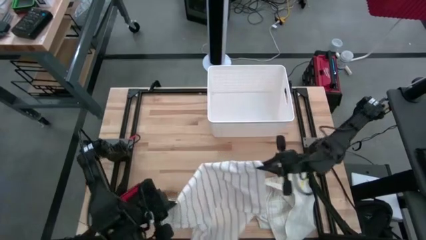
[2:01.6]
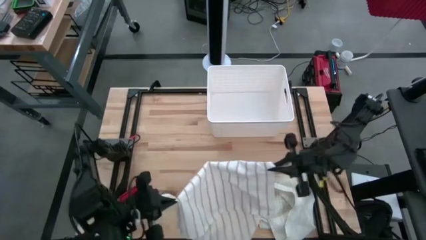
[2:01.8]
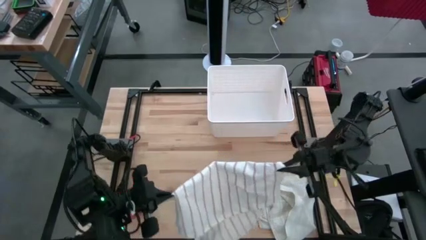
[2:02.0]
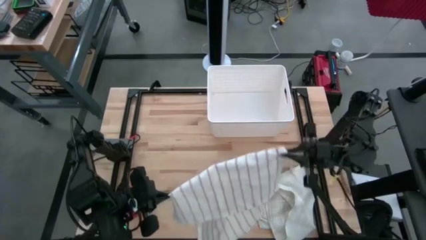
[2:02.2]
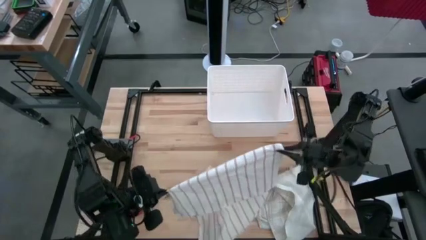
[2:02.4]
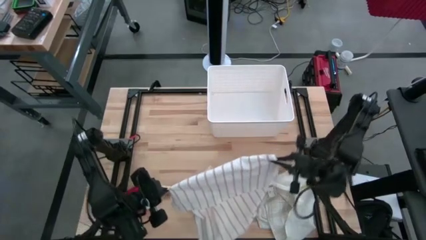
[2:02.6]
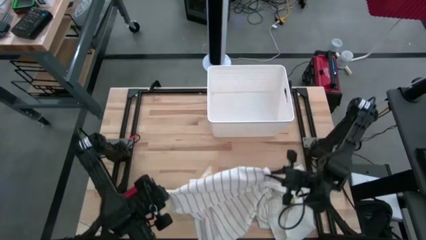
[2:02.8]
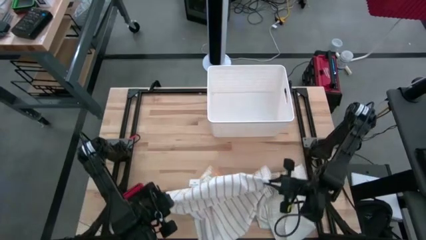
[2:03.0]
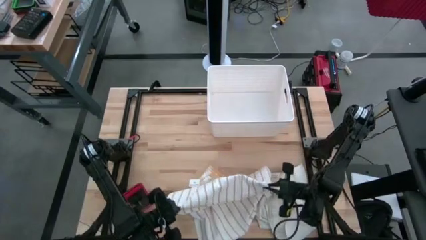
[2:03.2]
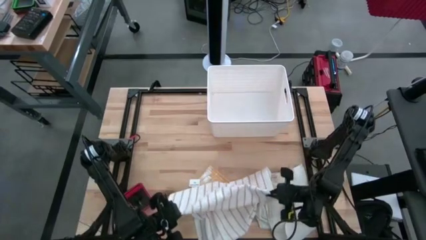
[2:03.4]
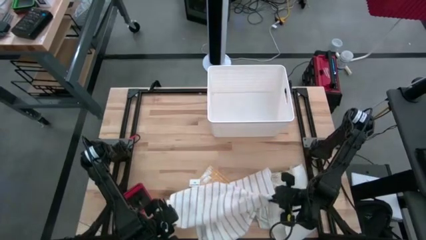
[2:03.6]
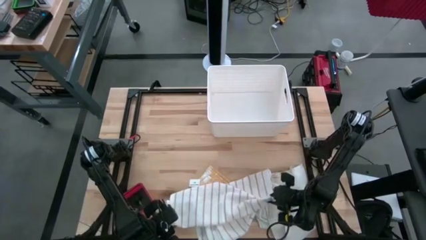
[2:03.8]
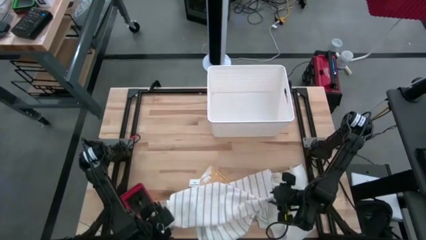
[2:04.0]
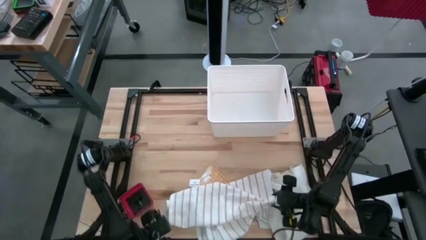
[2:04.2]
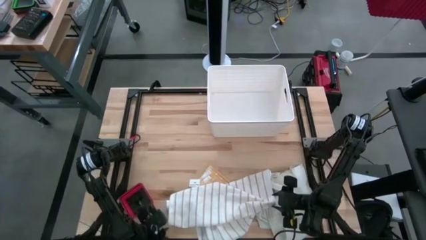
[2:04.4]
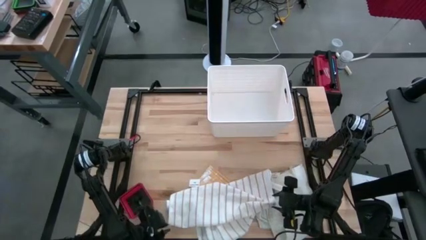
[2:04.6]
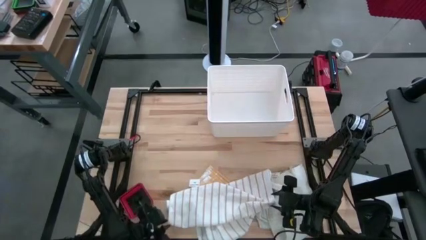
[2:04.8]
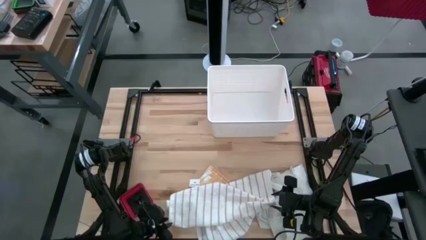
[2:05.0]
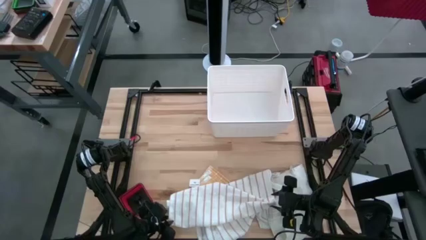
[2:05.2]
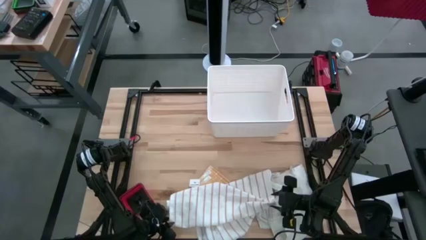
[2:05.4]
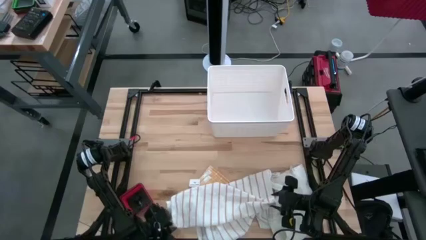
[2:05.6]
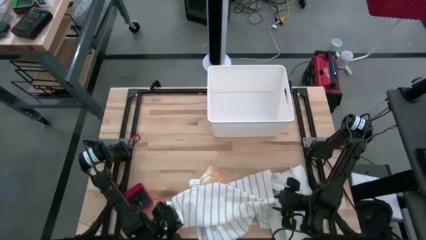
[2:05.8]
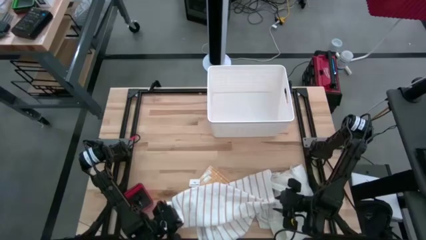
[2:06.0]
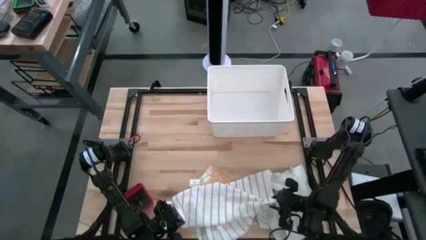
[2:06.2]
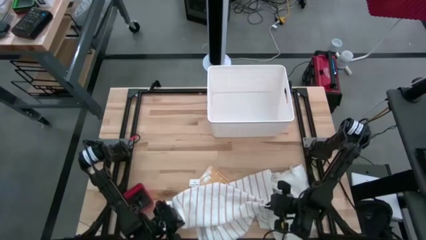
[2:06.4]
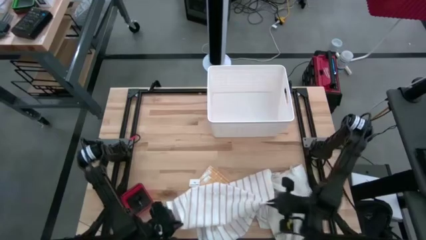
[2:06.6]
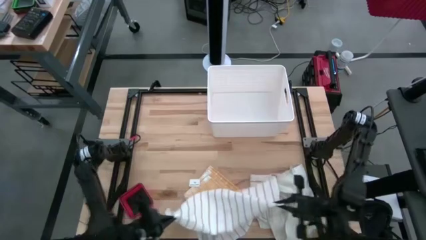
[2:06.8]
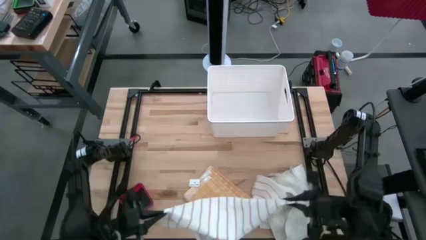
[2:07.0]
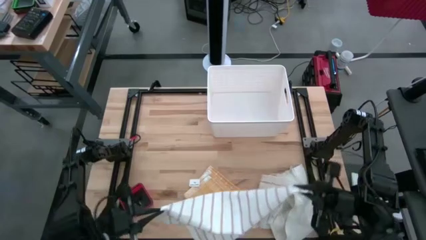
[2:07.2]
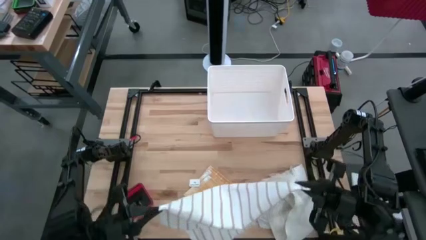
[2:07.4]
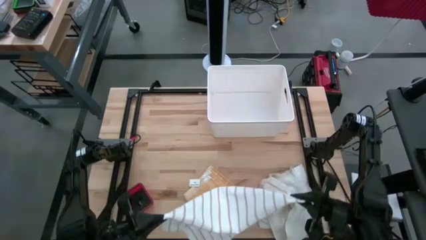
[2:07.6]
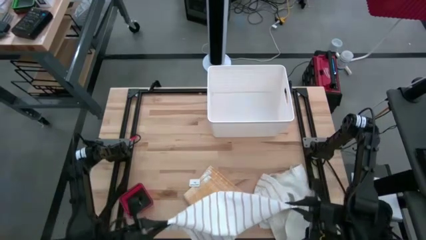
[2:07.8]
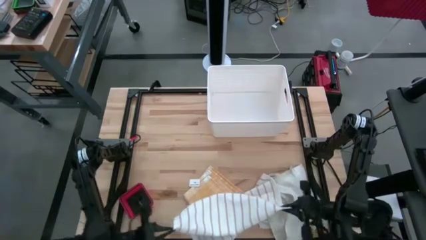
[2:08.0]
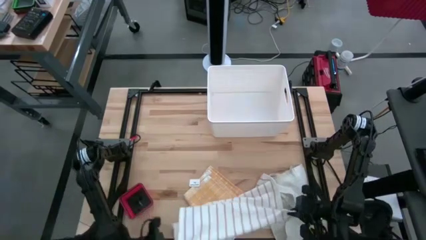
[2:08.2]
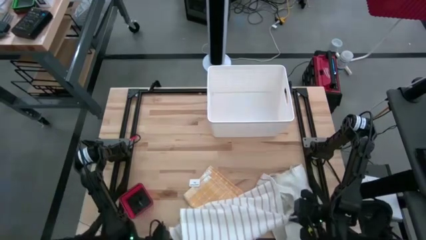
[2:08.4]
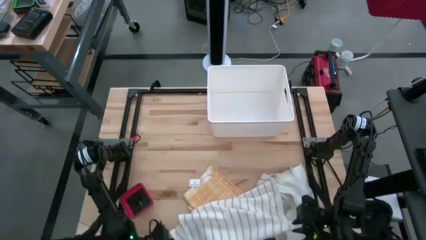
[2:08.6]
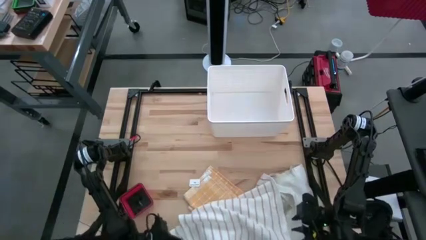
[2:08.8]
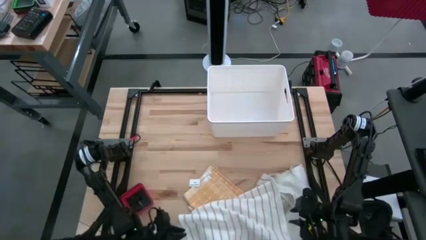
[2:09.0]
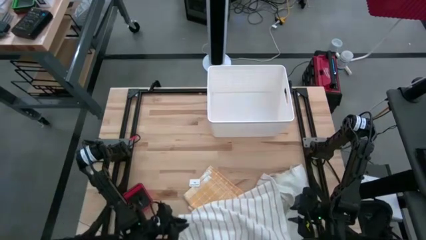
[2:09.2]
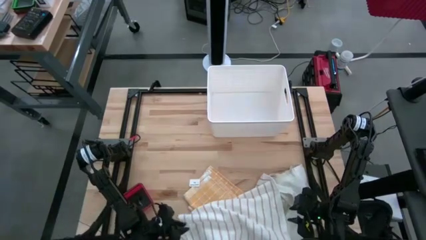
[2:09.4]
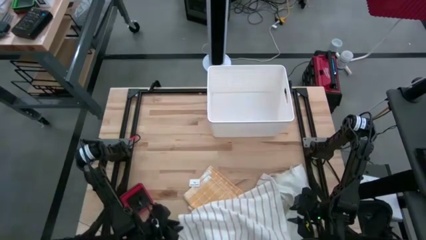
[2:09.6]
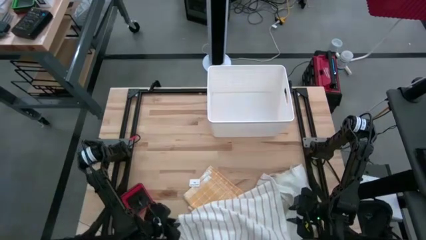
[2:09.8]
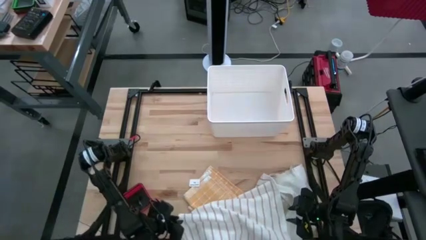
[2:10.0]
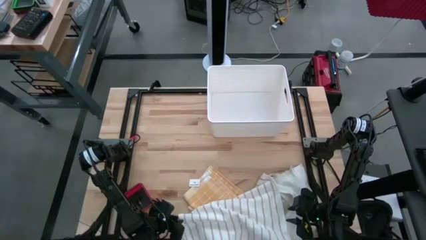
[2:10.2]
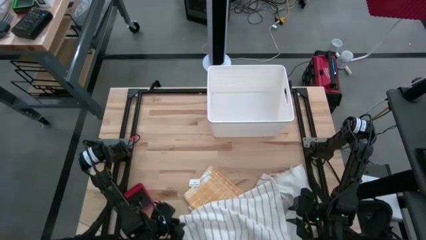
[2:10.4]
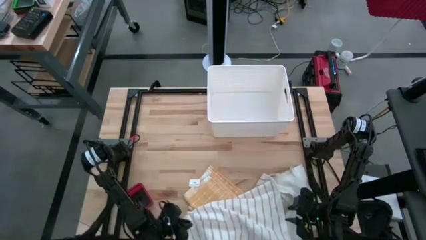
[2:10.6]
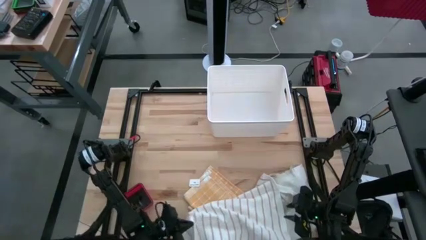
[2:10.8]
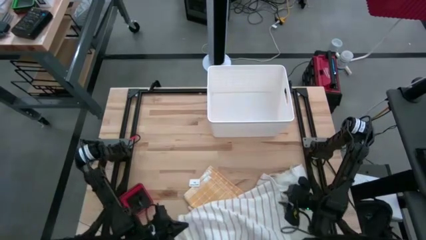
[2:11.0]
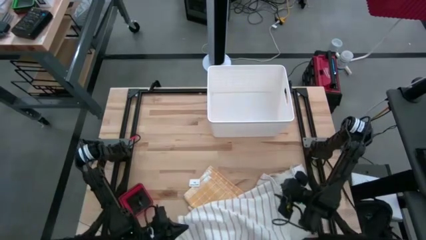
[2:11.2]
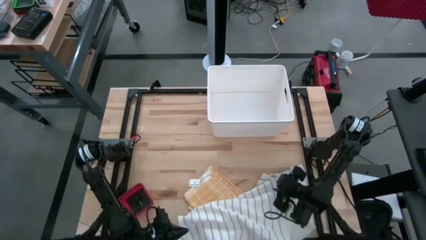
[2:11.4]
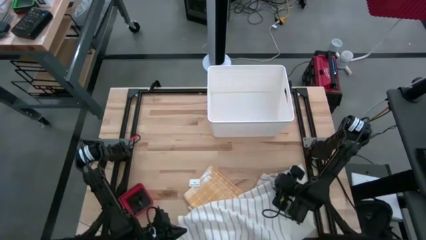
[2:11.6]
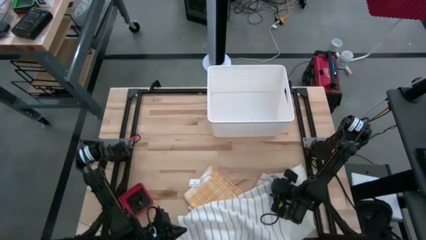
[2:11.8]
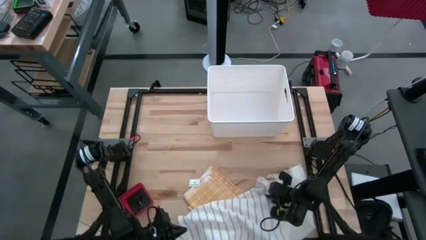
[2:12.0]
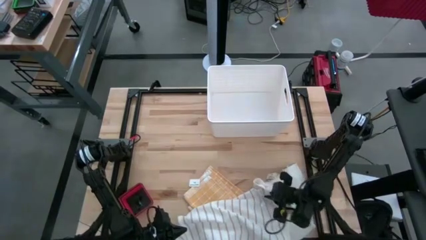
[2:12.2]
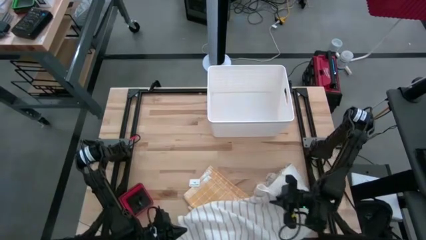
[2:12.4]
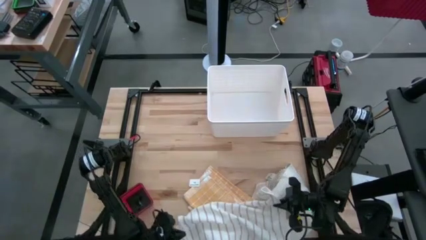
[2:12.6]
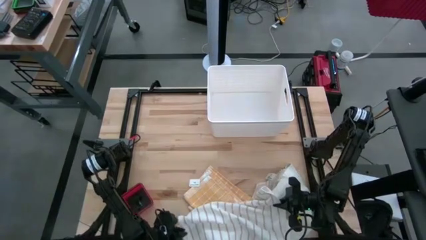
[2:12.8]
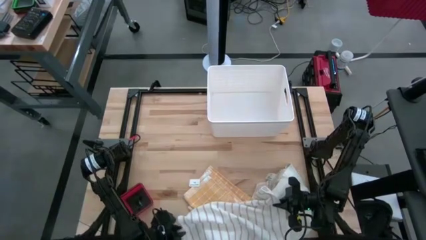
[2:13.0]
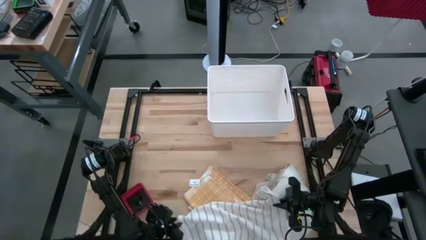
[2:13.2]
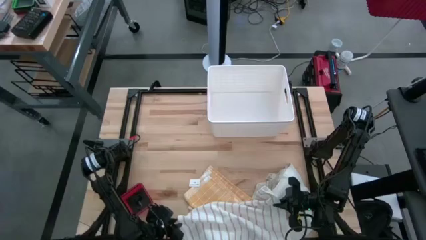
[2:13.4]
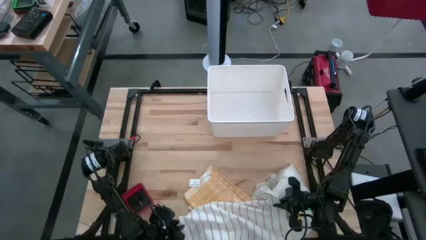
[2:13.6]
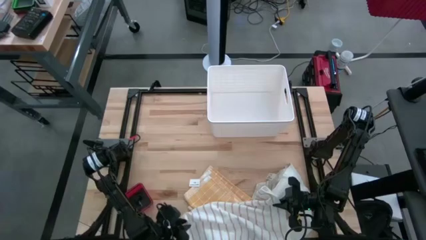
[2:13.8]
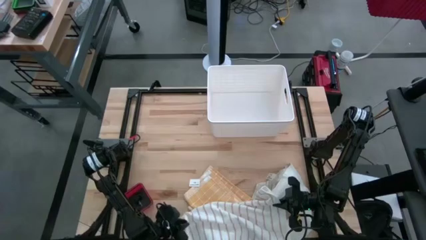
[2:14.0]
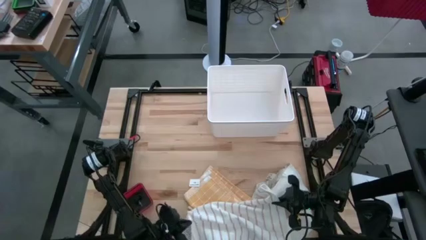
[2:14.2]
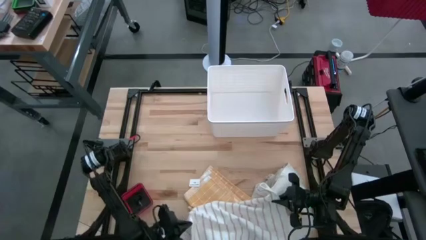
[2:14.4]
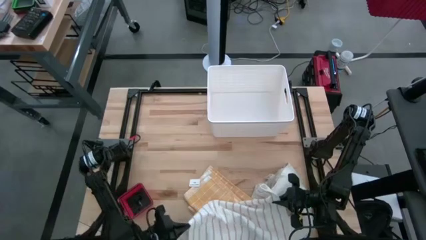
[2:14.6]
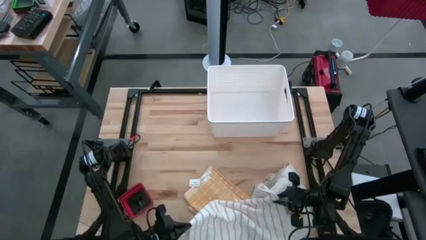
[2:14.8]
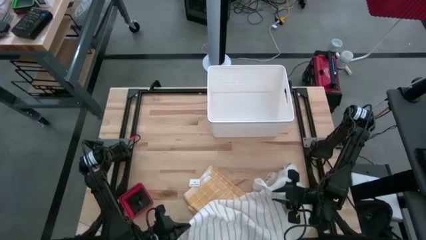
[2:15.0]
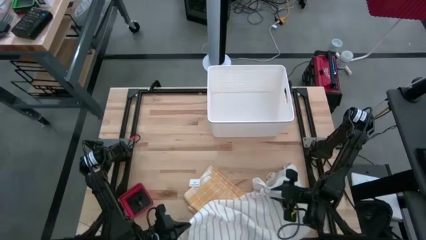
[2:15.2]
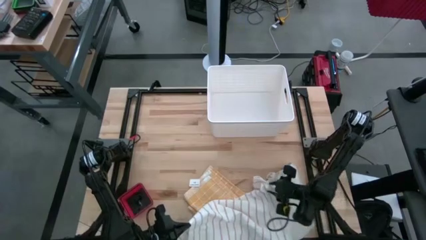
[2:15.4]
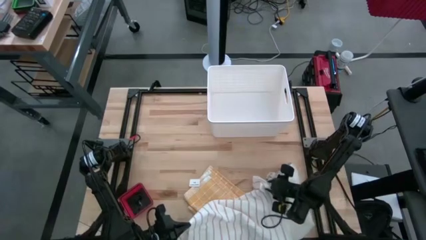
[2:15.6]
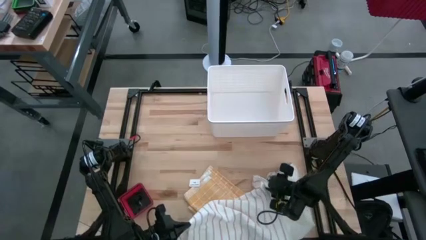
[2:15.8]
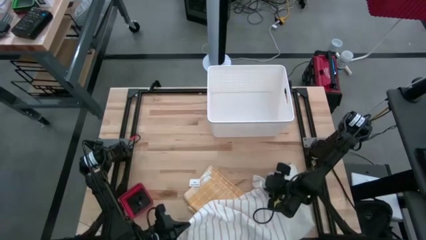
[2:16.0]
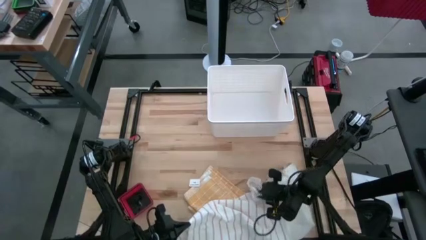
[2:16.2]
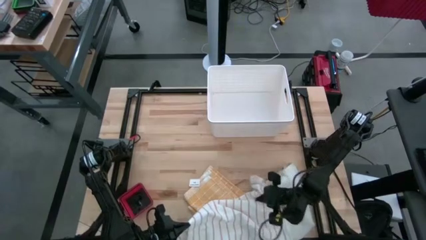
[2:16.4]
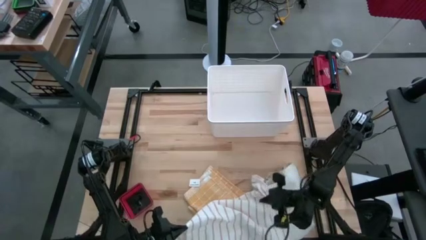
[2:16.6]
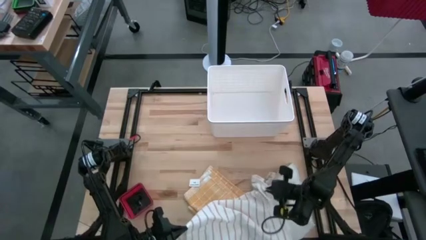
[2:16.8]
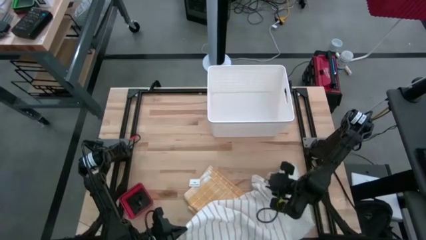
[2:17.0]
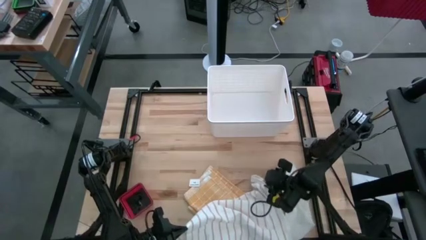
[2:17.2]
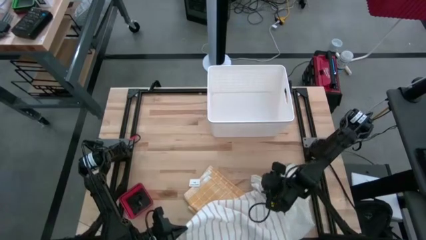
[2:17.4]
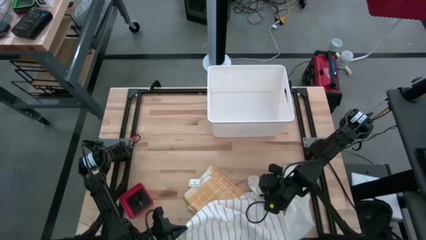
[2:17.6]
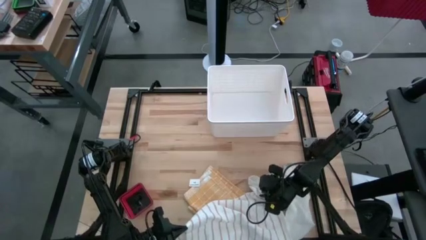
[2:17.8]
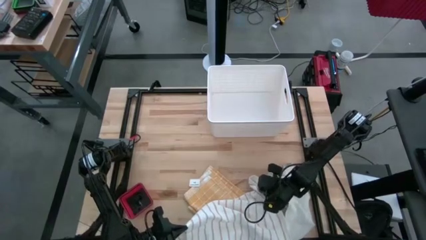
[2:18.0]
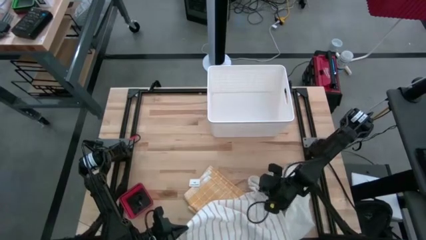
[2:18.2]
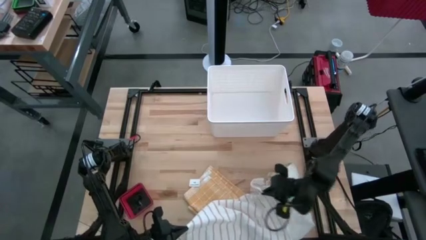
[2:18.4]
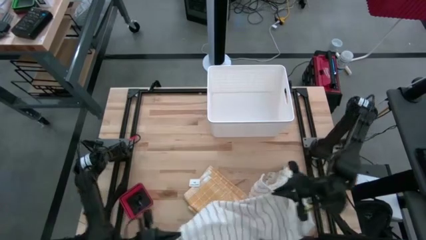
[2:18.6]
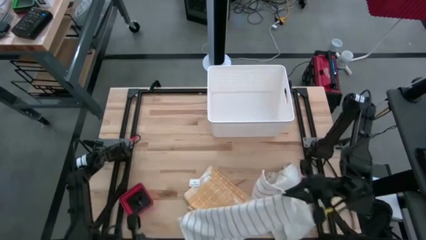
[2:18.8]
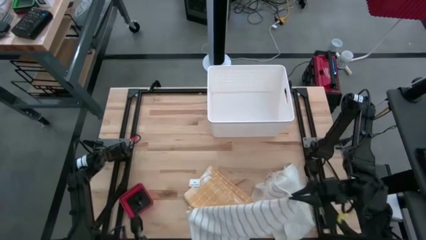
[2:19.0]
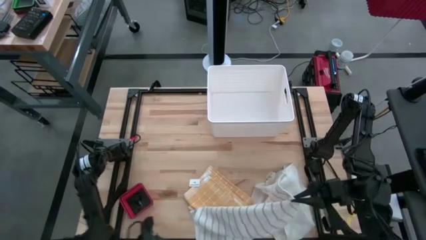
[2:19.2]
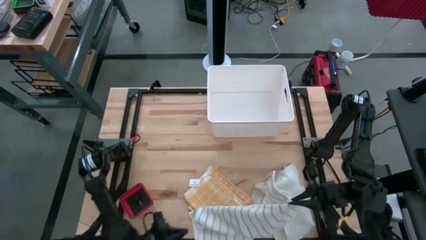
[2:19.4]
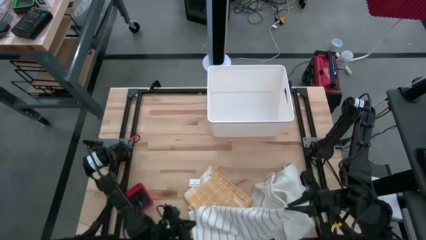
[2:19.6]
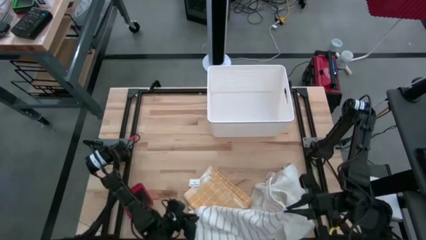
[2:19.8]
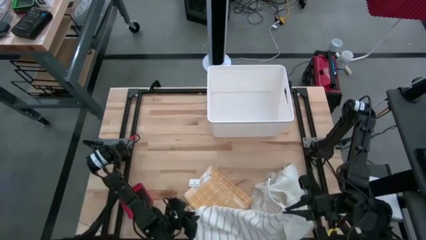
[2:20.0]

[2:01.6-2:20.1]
Task: Fold towel
Fold the brown patterned towel
